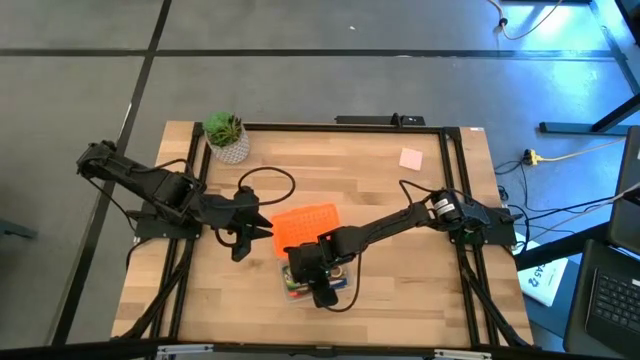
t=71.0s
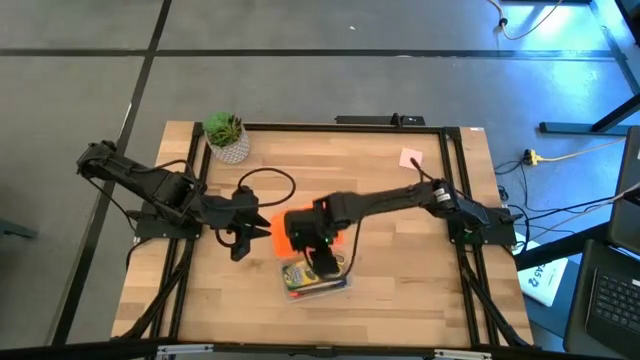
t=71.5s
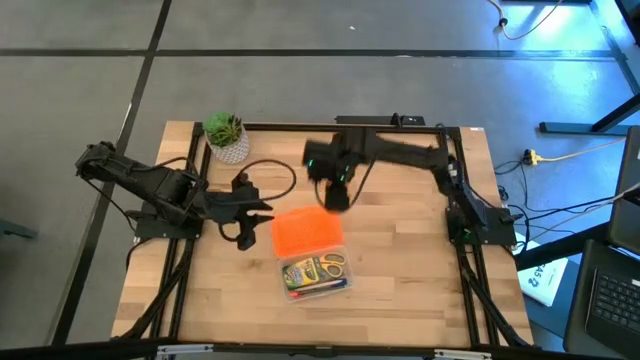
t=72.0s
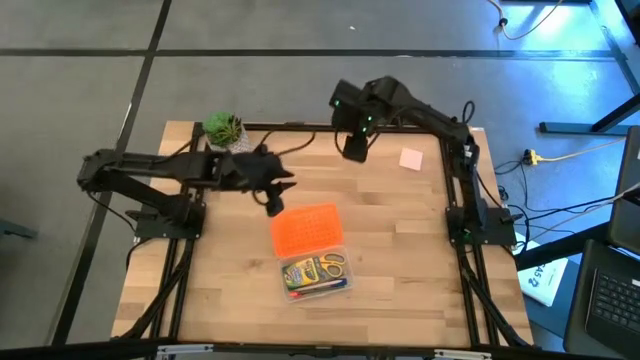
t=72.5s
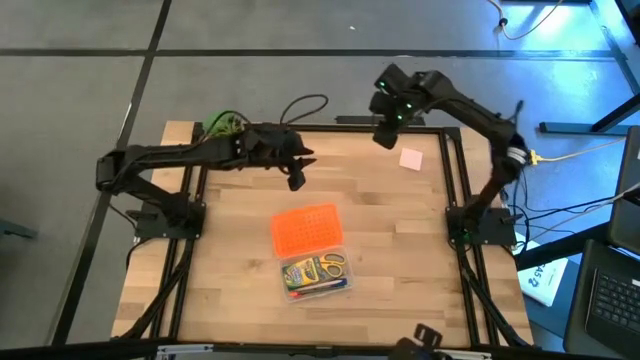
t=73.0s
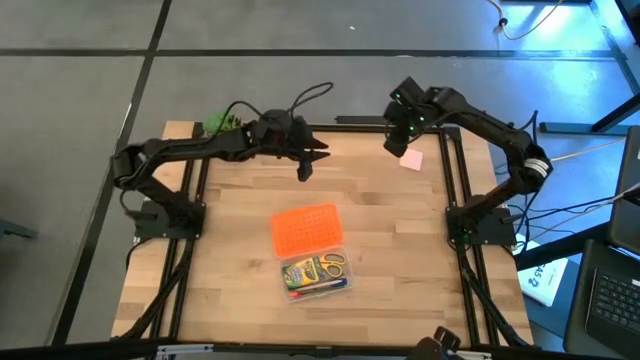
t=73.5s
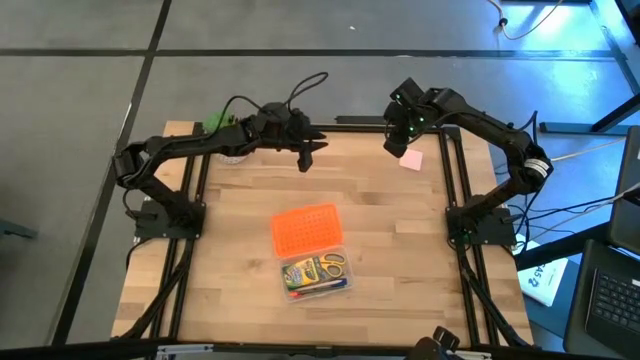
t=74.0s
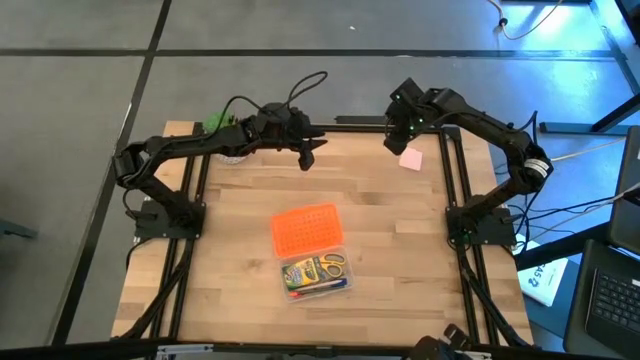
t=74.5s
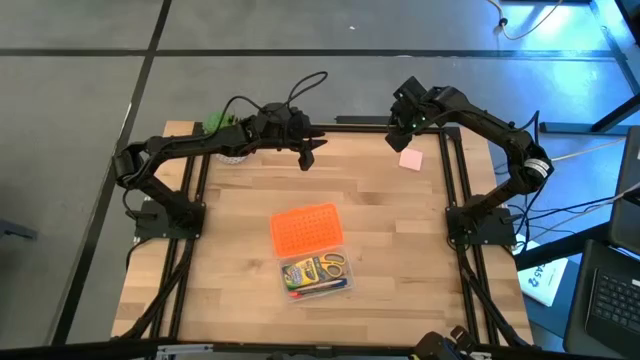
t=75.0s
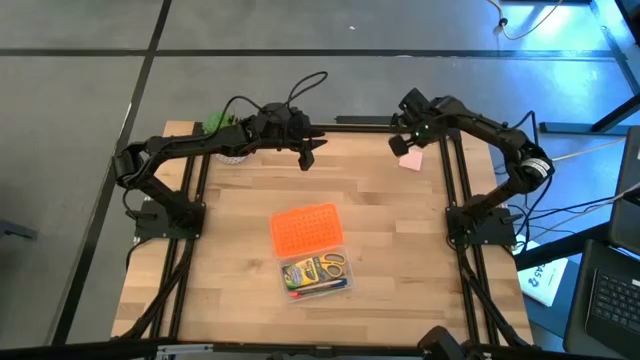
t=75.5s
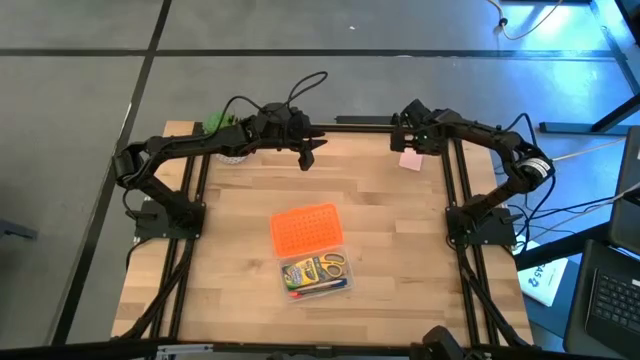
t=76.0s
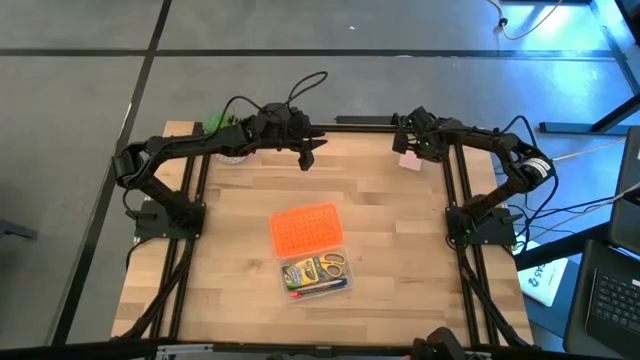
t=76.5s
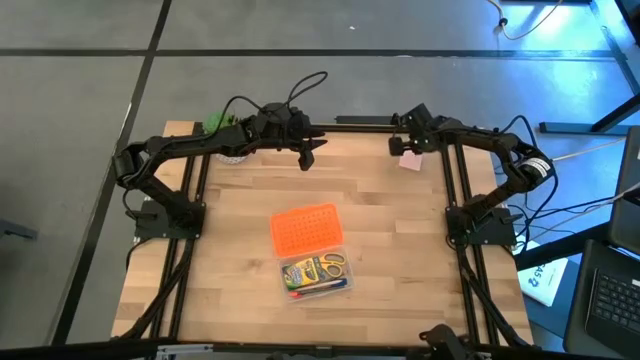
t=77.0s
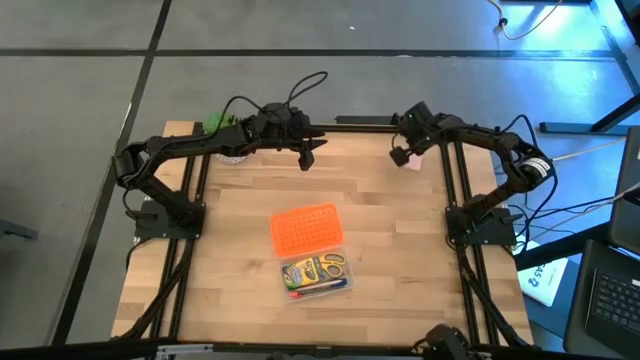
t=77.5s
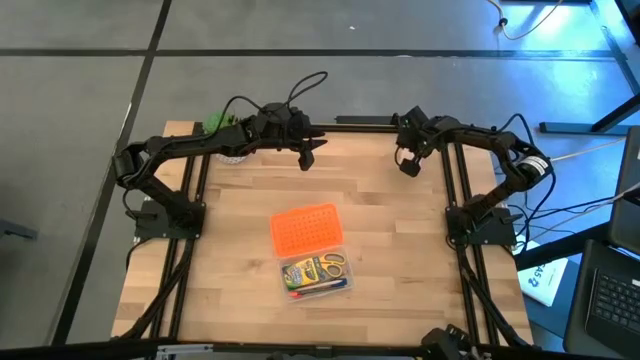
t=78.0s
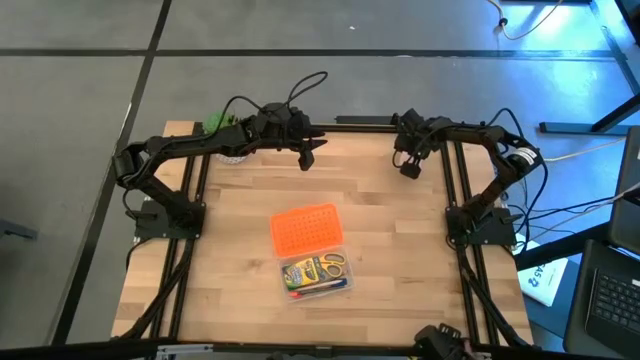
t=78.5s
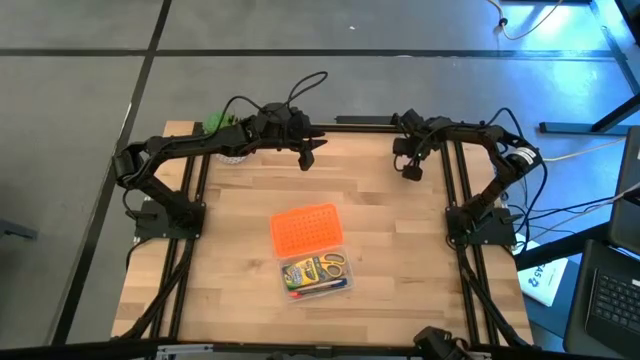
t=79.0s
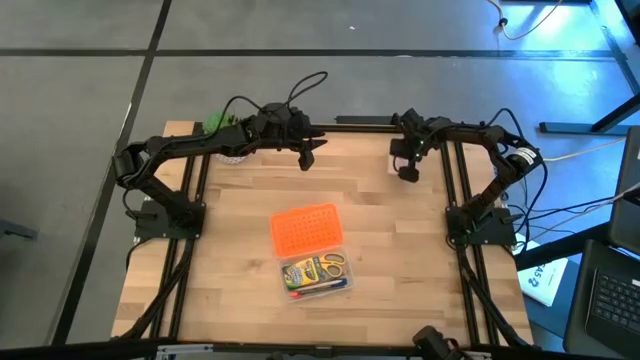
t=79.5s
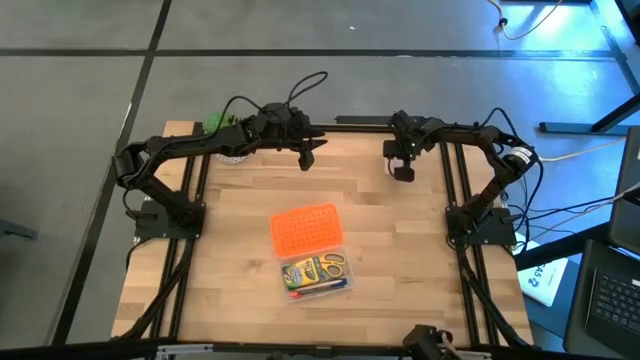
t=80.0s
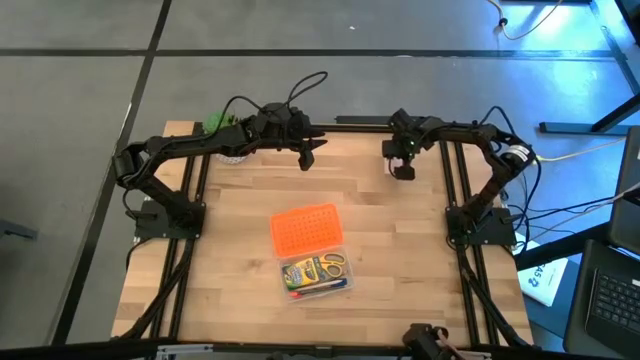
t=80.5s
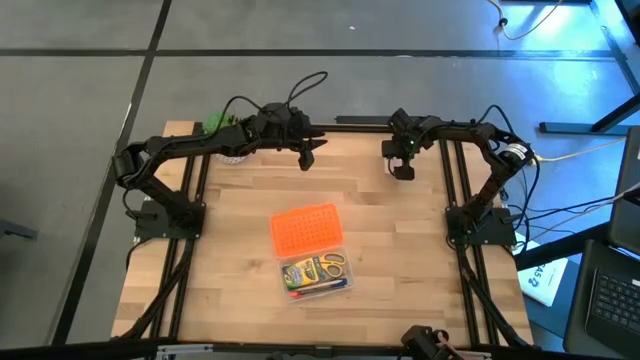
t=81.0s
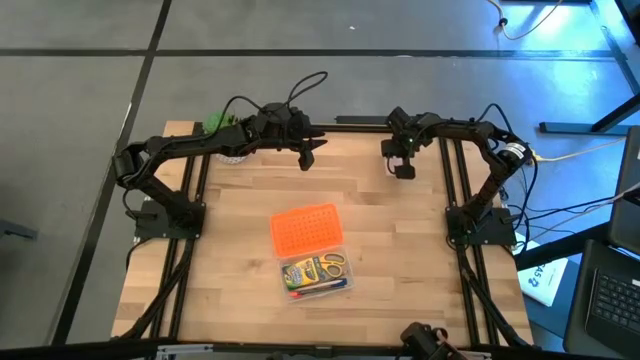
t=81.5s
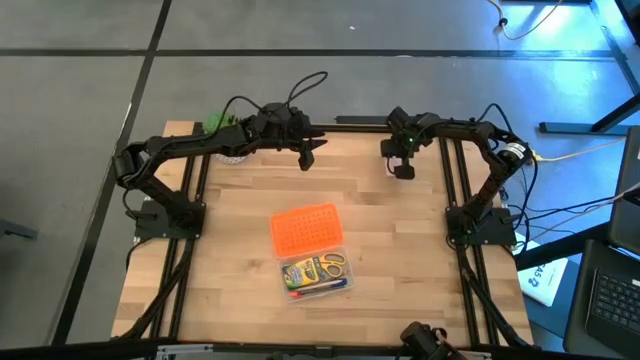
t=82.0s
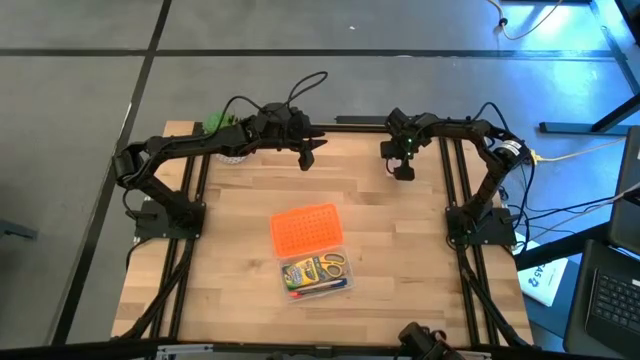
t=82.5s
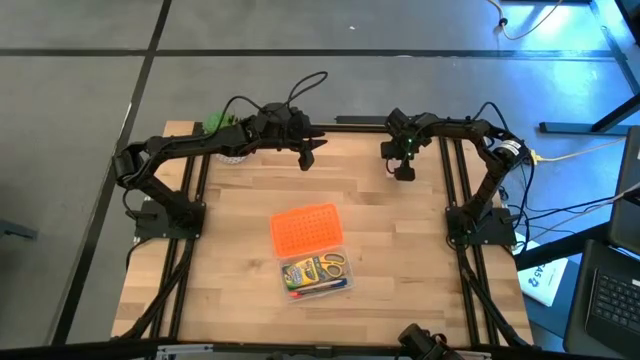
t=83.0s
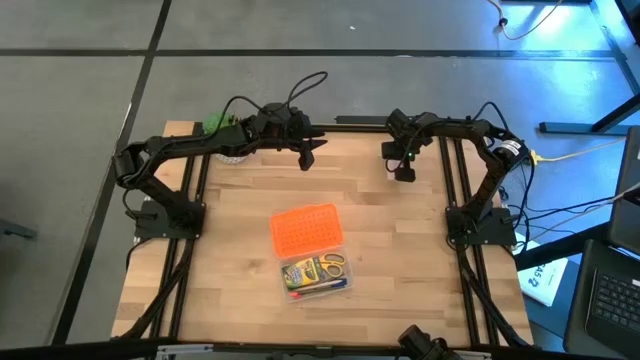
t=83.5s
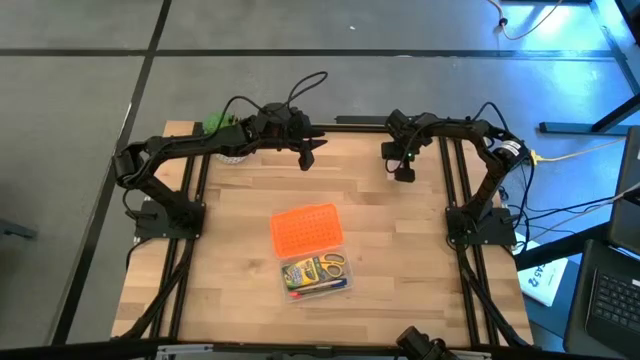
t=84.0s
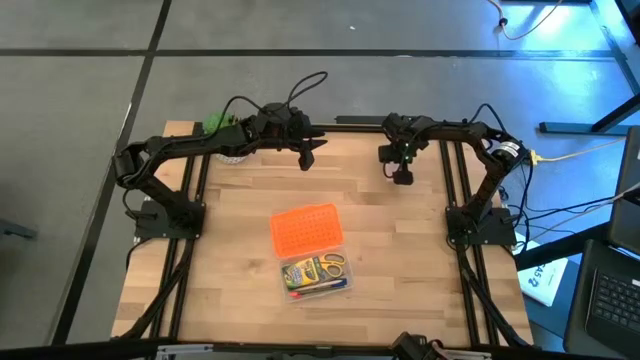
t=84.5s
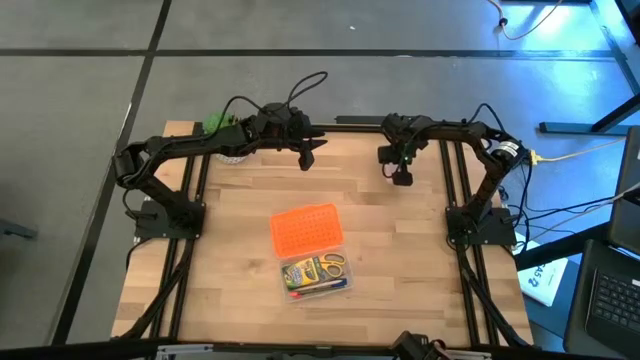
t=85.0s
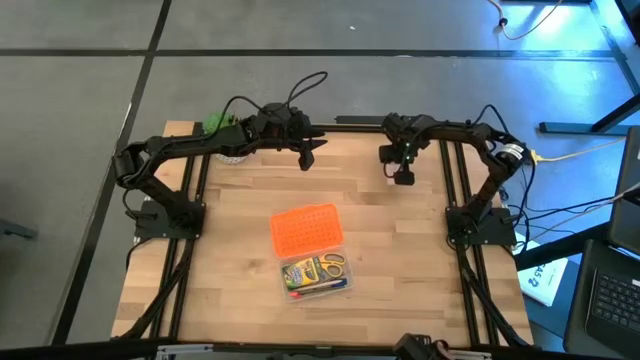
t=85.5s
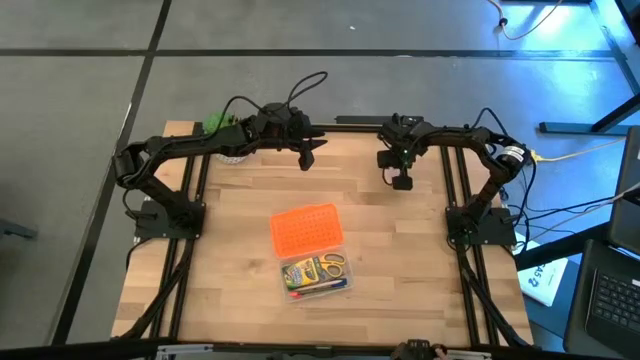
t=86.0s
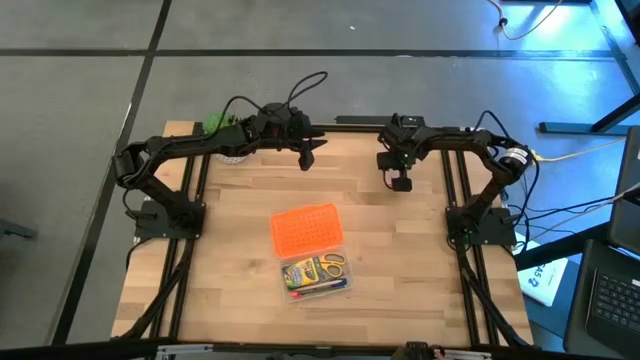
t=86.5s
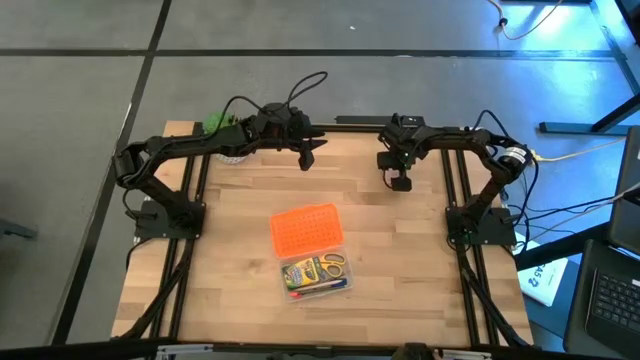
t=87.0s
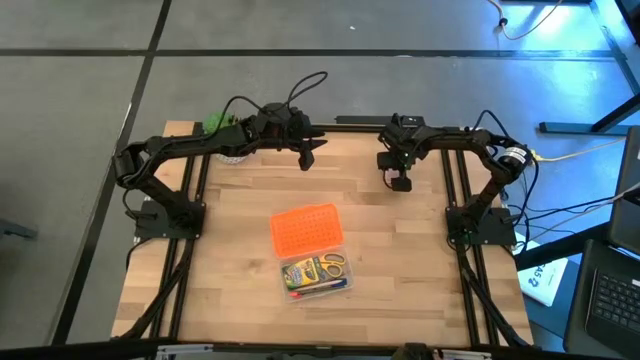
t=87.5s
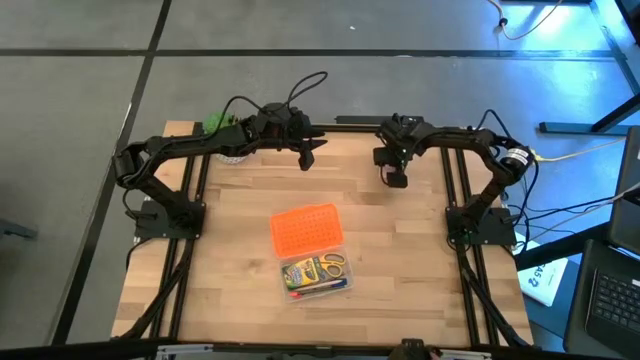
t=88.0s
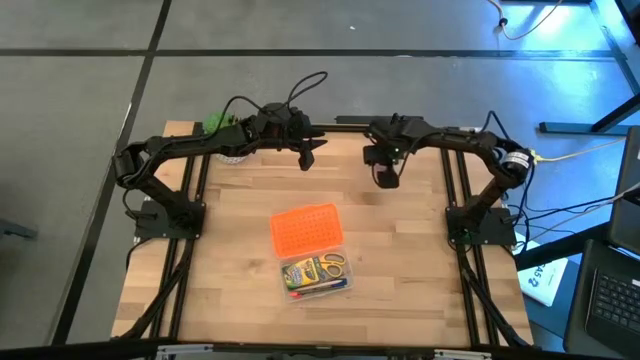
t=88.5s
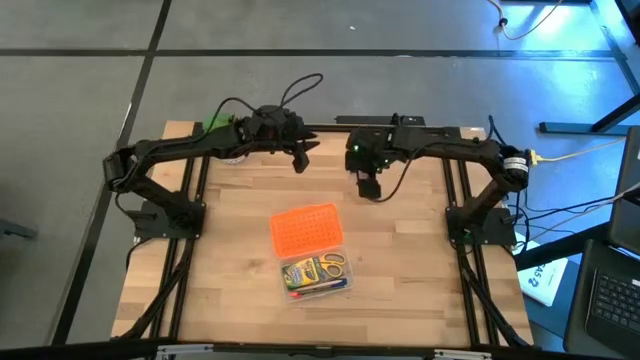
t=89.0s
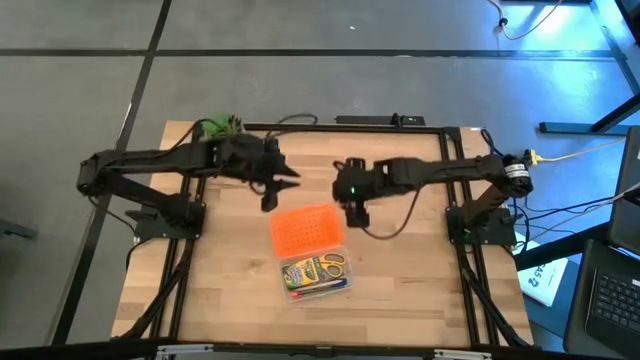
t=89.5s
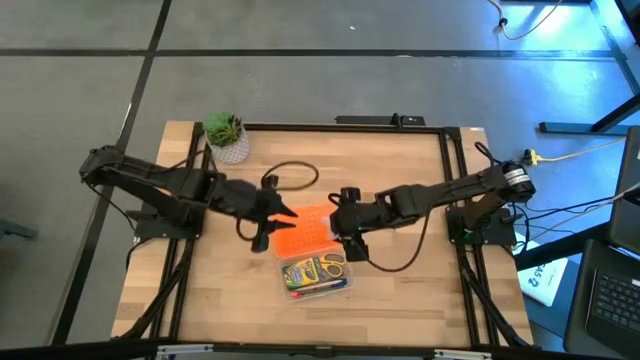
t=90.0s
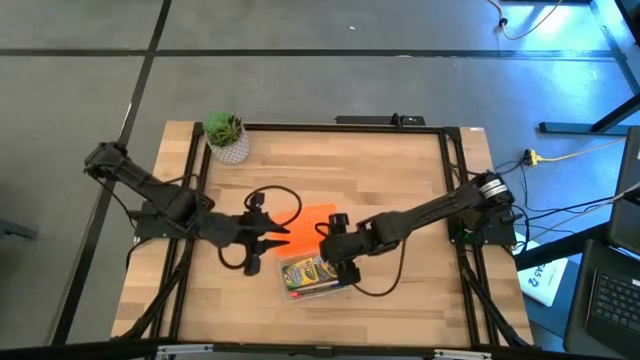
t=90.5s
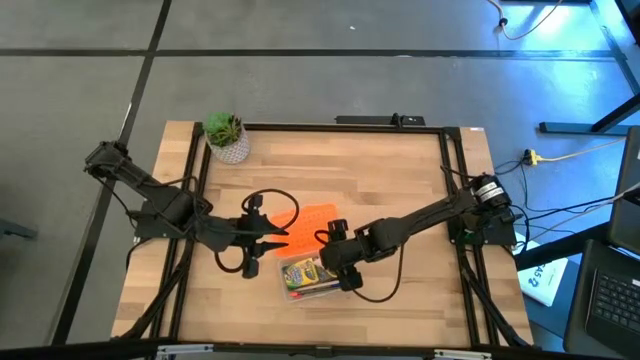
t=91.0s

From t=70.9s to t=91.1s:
Task: Pack school essentials
Put the pink sticky notes into the orange supply box

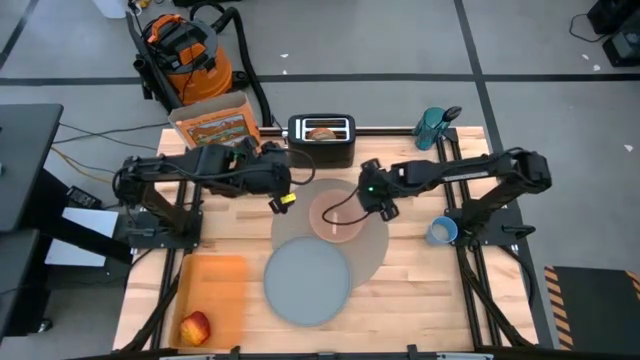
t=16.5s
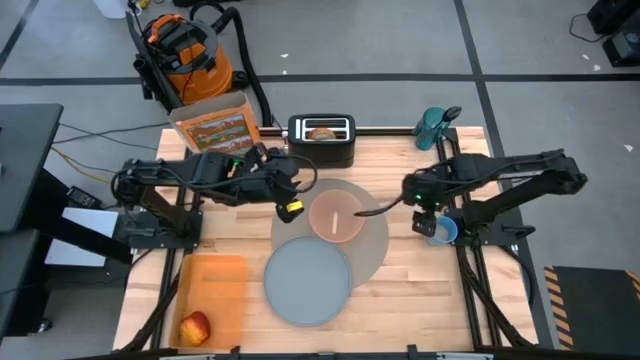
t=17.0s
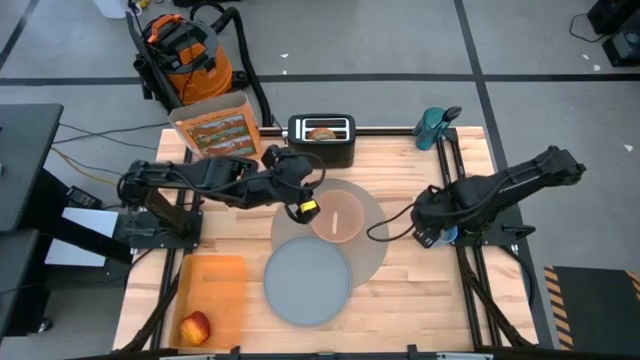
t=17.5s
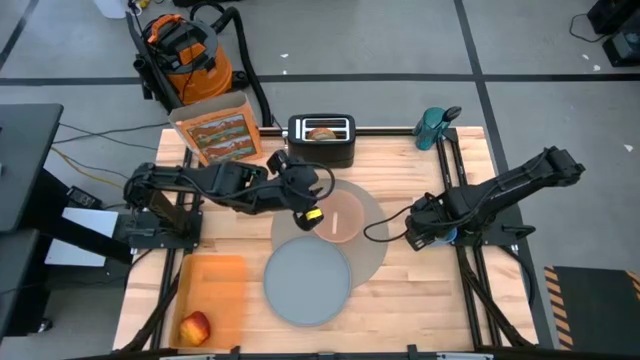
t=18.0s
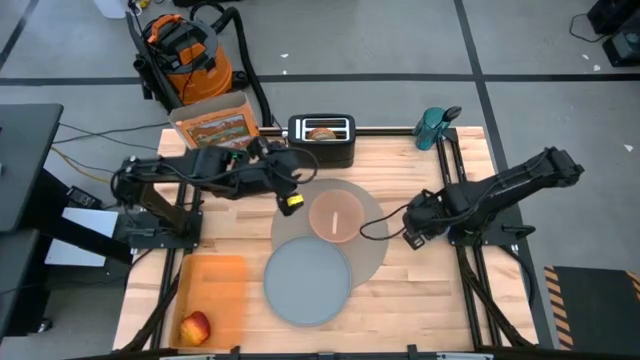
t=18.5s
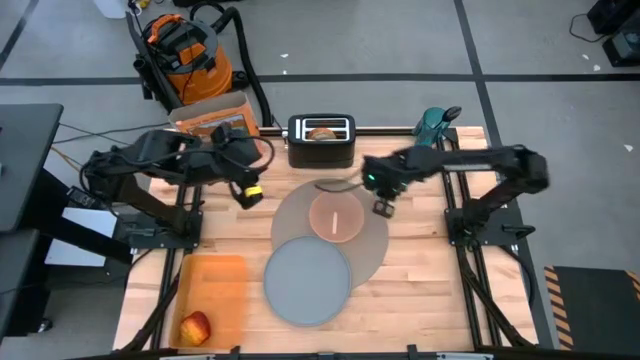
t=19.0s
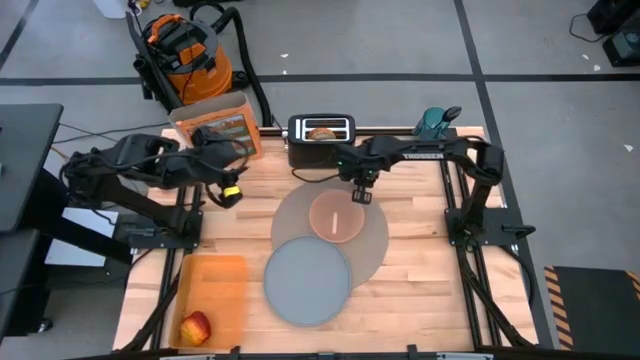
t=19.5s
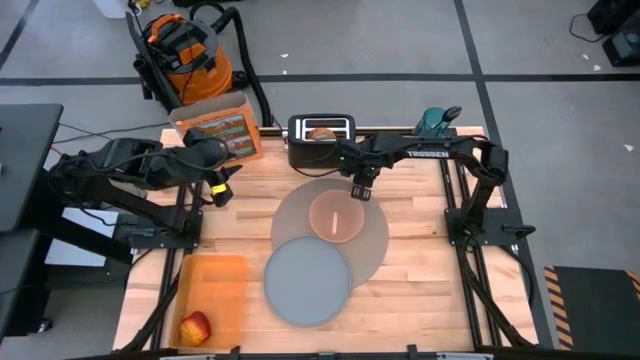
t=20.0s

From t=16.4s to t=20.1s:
Task: Arrange a breakfast setting
Put the blue cup with rice to the top right of the gray placemat
